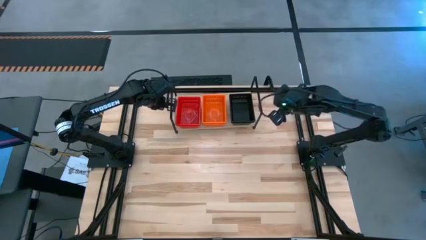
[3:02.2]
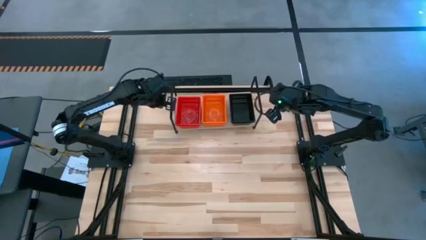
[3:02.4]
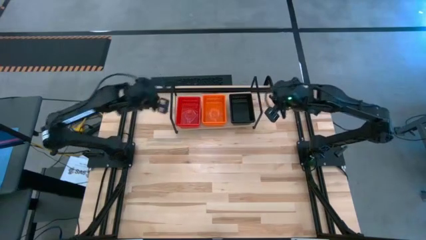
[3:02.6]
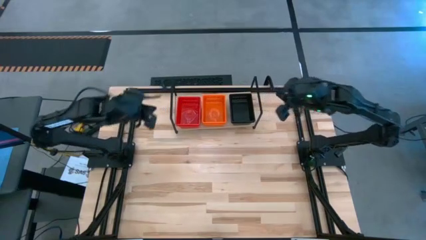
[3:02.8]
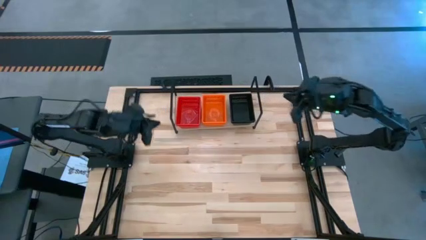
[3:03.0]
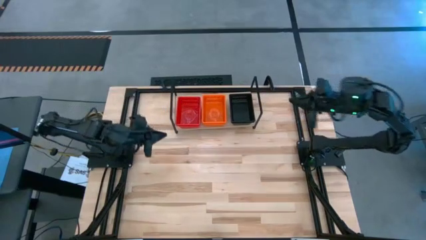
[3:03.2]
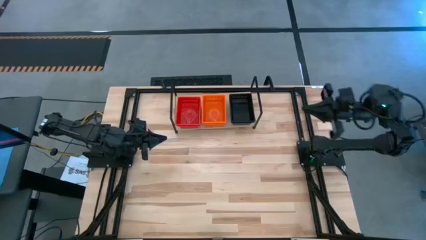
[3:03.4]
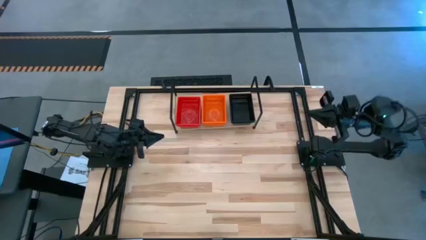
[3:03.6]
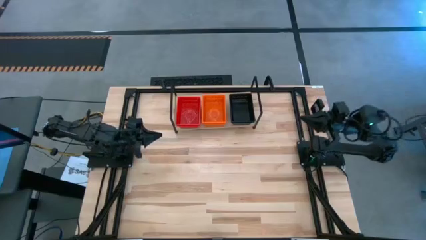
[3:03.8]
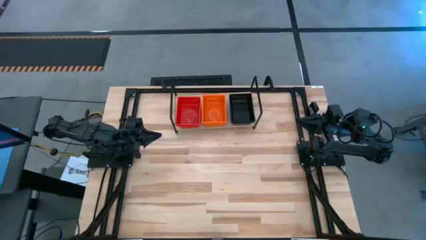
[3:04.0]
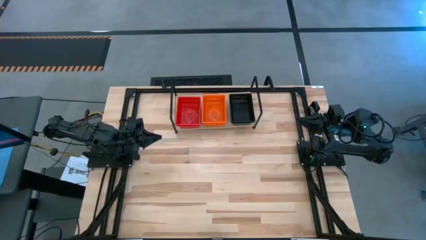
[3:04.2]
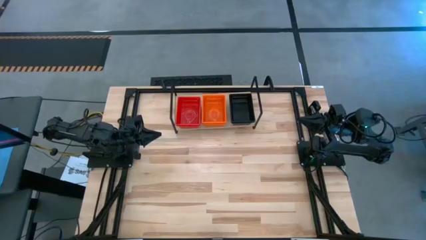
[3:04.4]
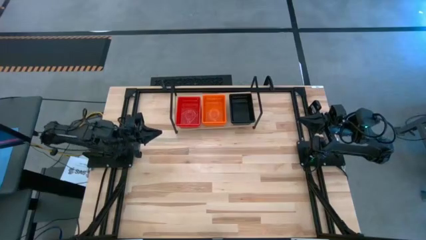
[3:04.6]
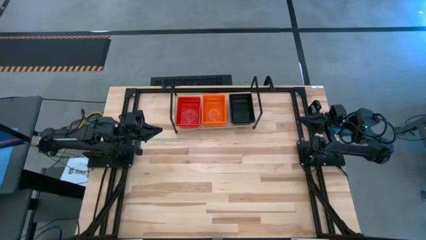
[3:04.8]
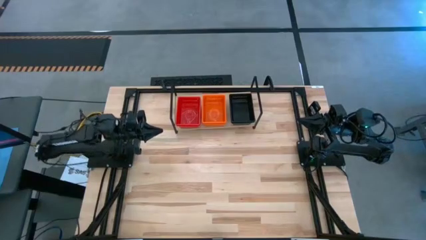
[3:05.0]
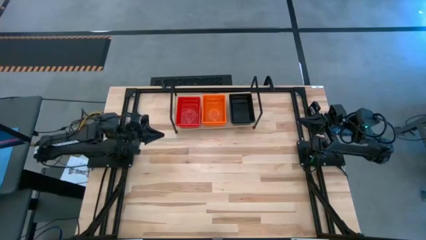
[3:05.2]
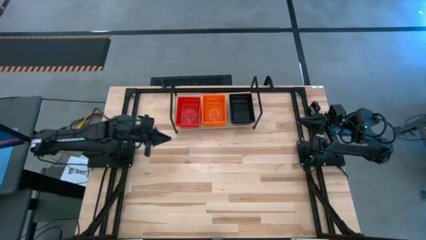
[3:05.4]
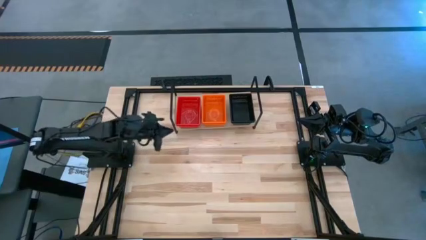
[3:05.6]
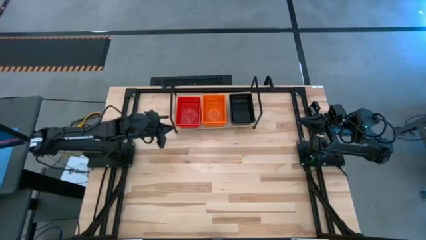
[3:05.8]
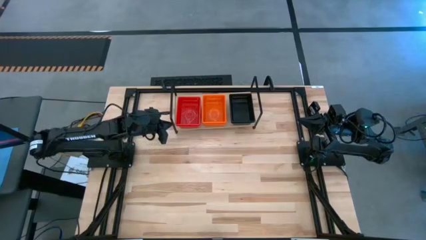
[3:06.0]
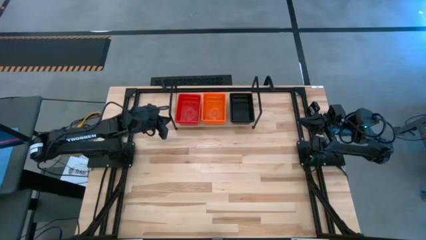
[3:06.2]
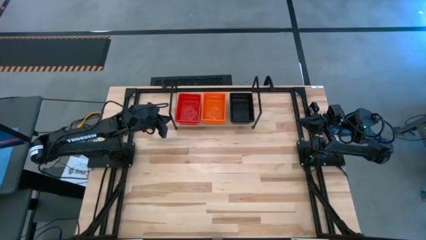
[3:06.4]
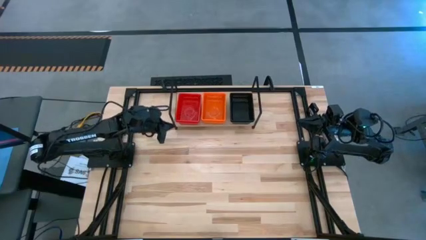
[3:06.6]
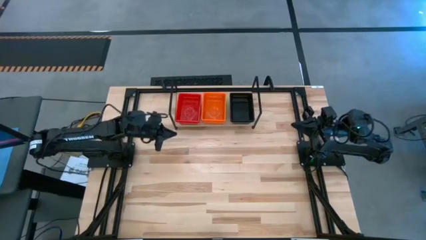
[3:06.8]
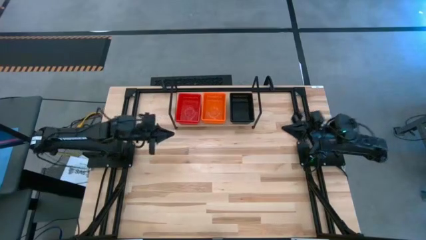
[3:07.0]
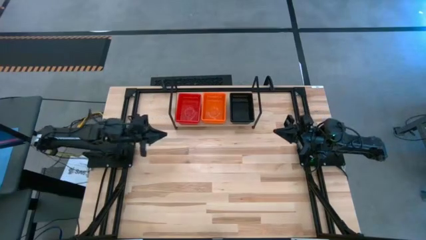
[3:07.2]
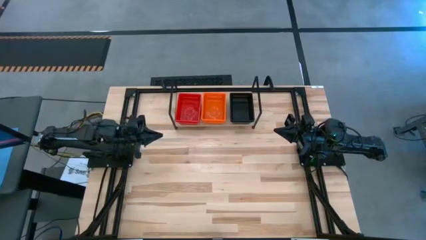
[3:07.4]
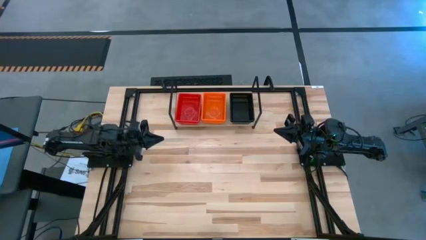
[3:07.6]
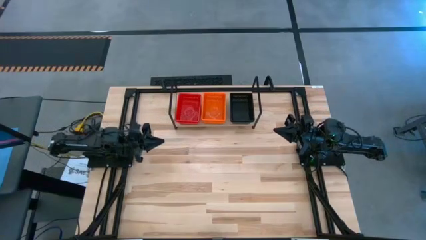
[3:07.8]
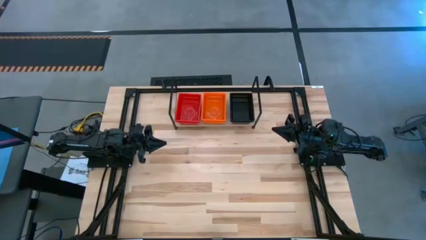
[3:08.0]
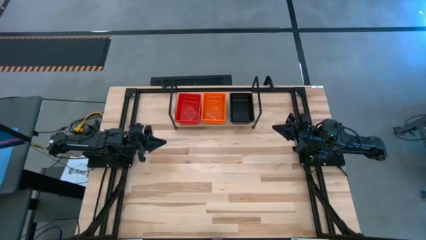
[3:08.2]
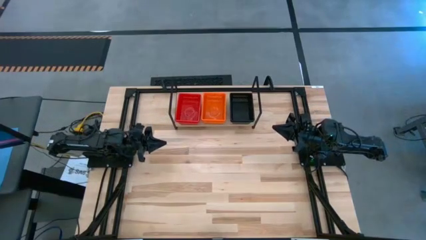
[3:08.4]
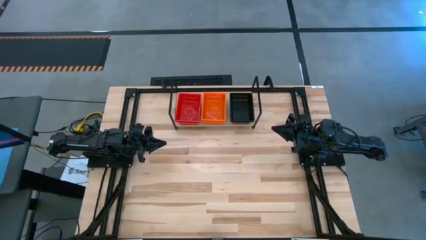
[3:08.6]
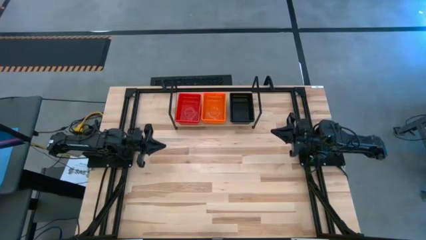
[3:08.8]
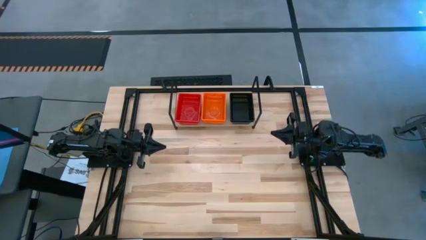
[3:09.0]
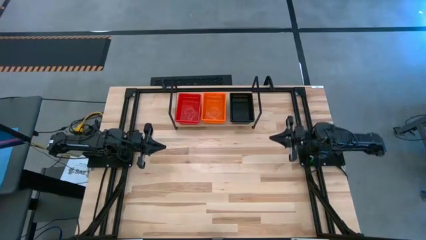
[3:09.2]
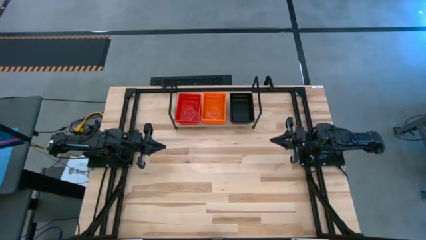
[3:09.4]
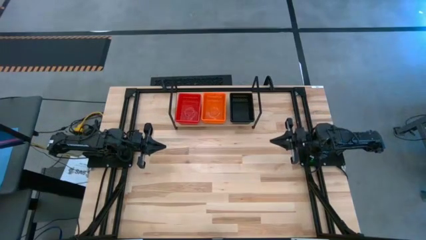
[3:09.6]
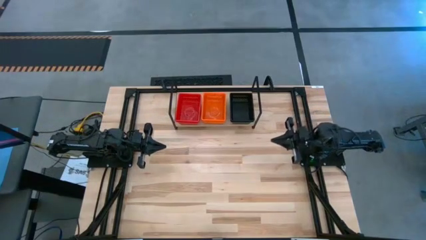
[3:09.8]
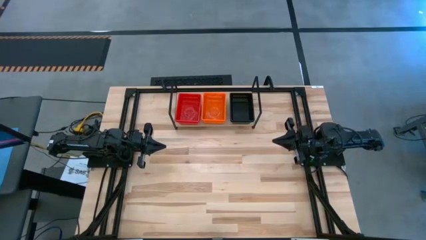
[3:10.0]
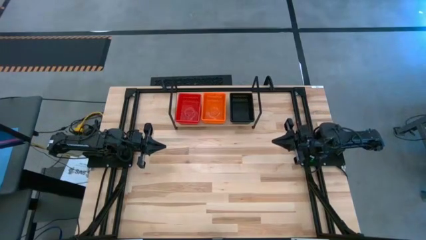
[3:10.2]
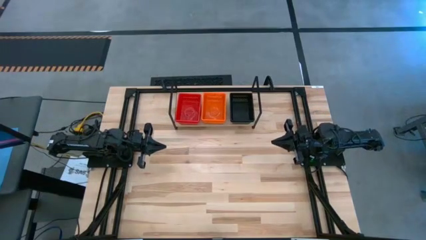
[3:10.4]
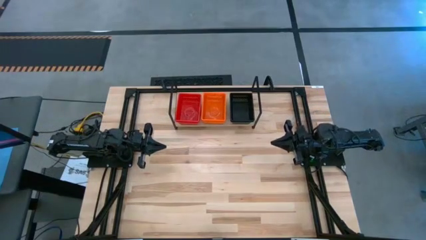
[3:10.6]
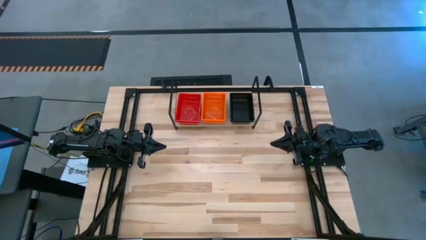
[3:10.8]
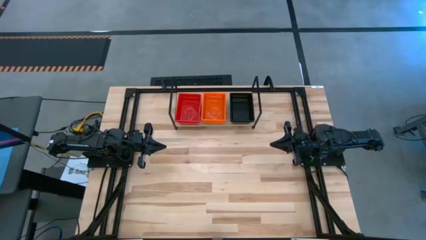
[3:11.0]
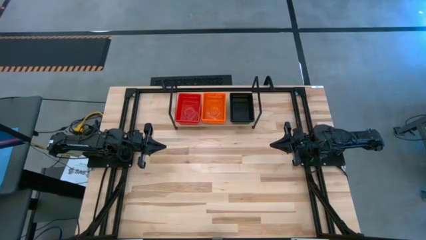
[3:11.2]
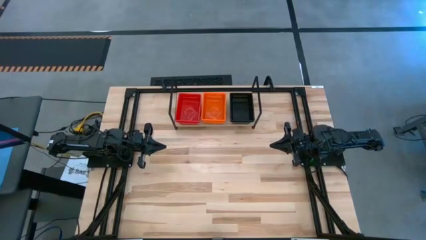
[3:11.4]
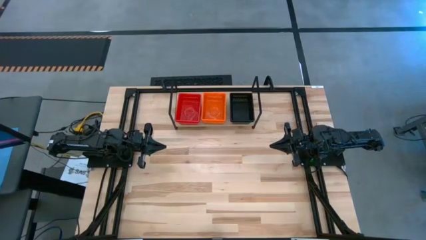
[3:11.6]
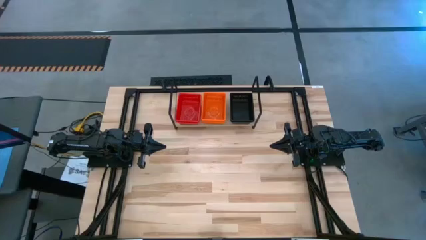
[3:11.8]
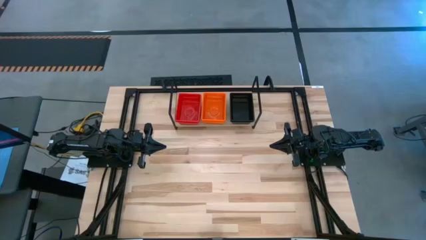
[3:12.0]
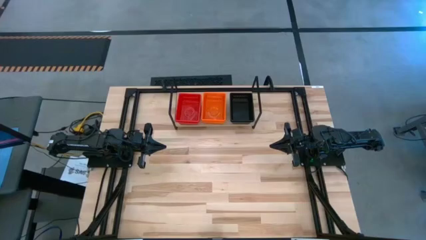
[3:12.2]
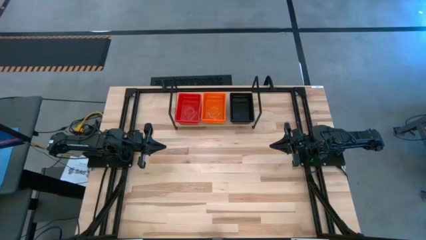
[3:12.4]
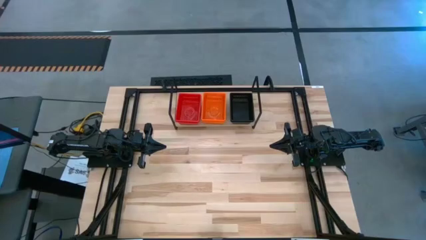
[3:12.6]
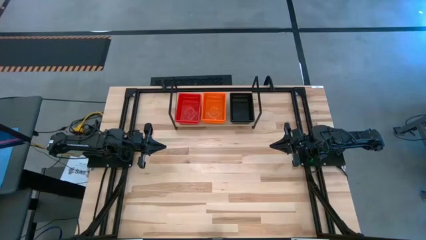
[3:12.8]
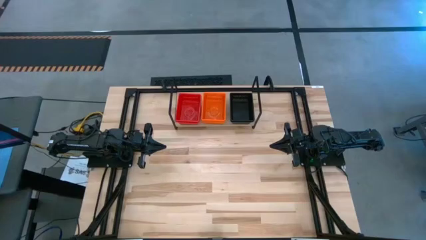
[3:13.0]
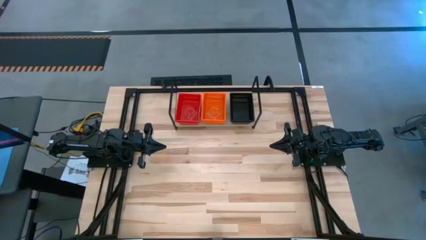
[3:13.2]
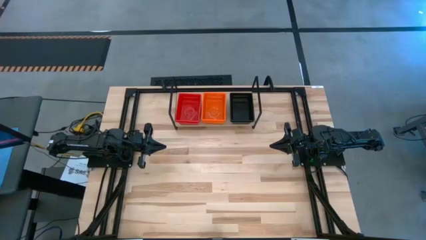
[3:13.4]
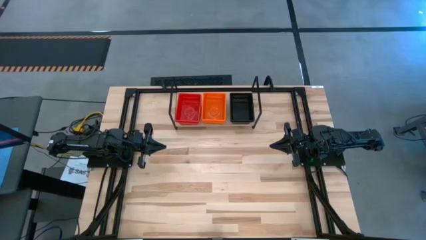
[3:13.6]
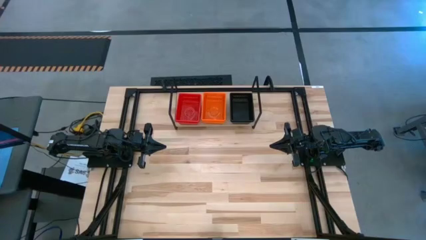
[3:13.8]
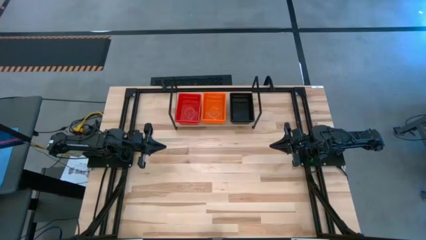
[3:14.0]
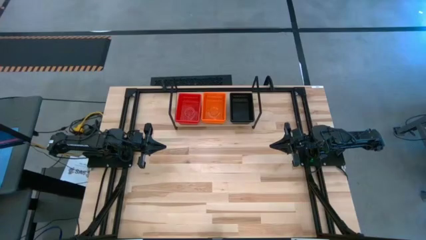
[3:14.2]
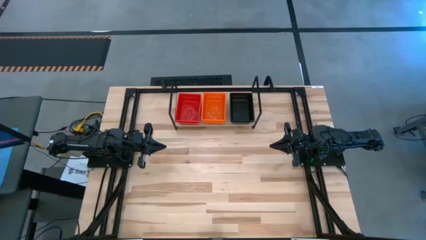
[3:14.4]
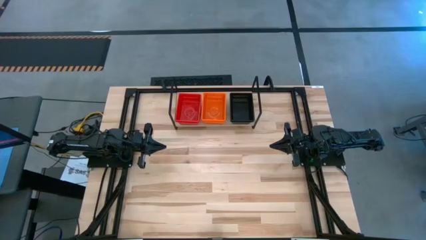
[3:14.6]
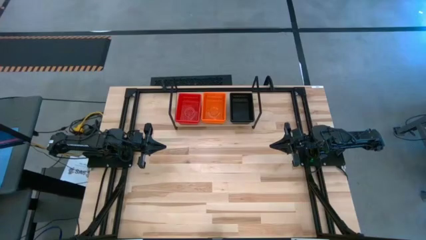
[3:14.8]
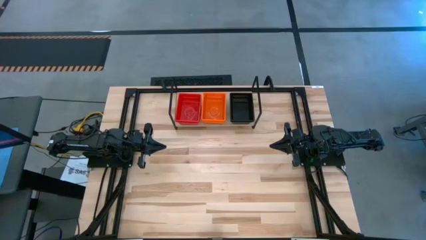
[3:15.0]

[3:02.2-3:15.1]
Task: Stack baskets on shelf by color
Return to Home Position
